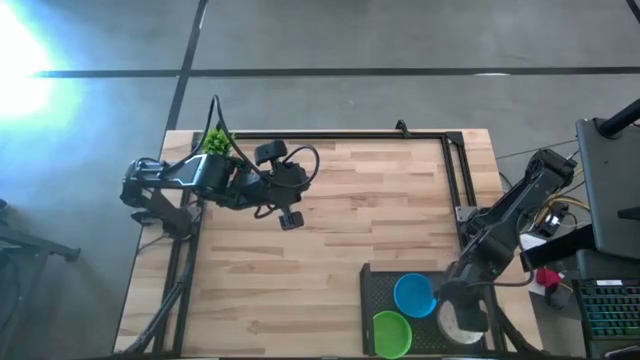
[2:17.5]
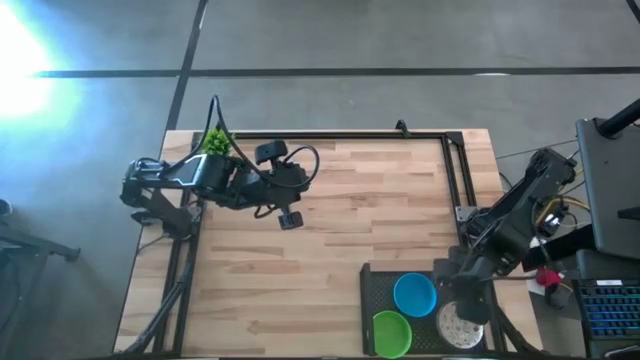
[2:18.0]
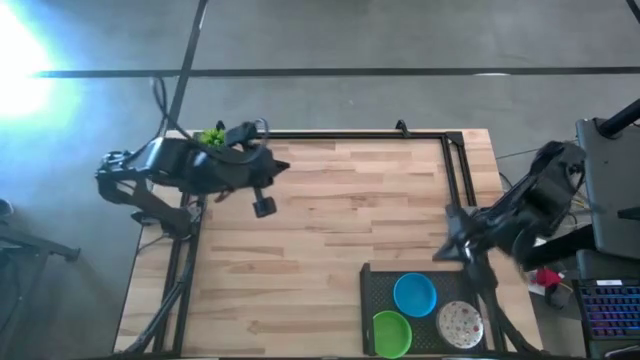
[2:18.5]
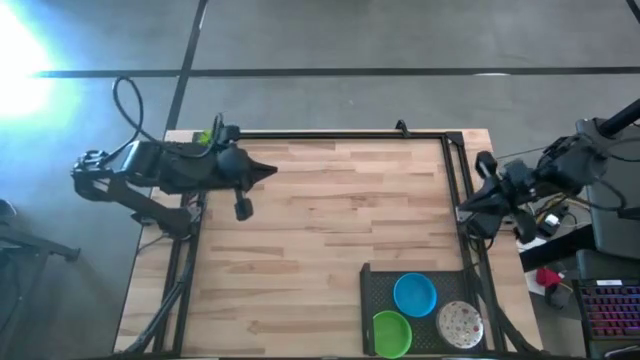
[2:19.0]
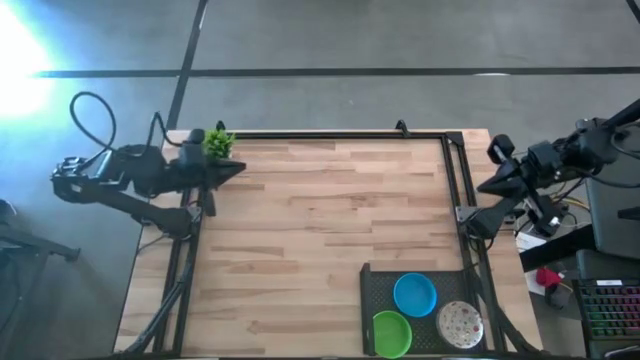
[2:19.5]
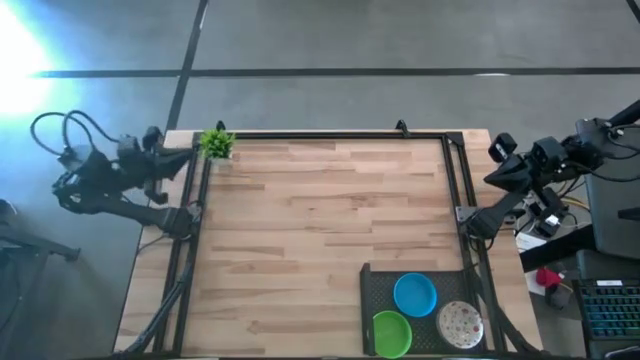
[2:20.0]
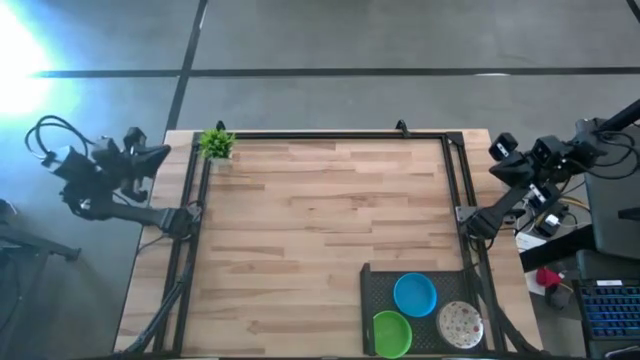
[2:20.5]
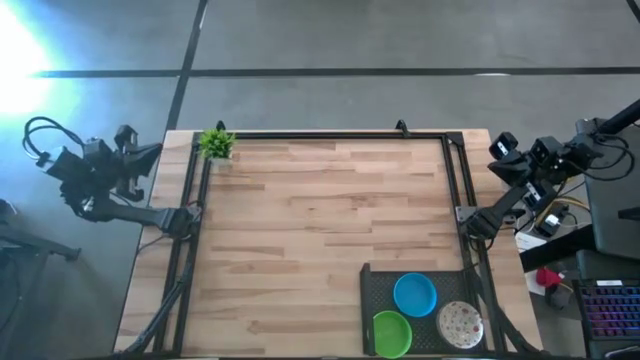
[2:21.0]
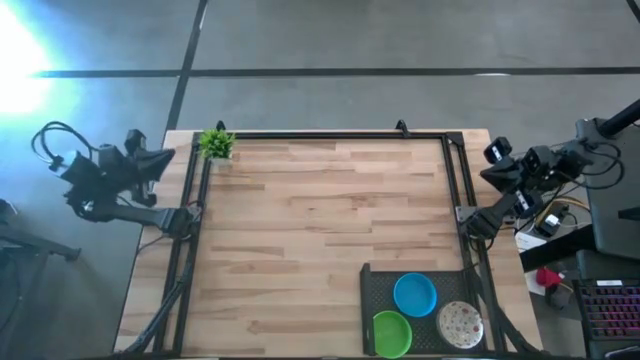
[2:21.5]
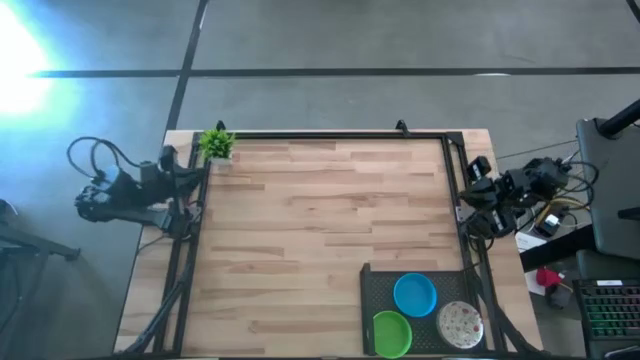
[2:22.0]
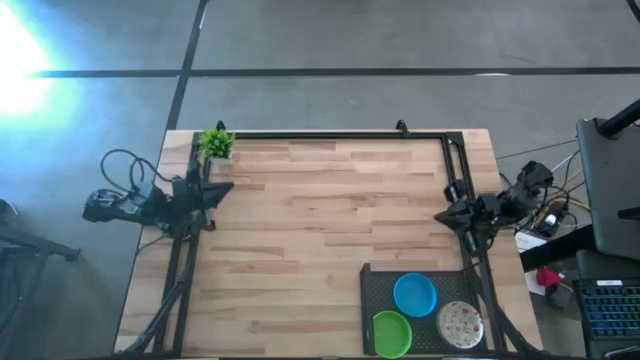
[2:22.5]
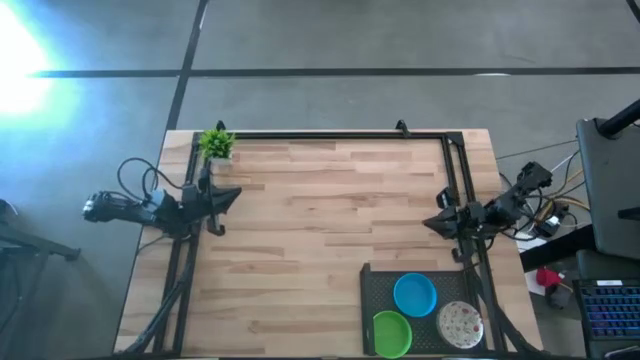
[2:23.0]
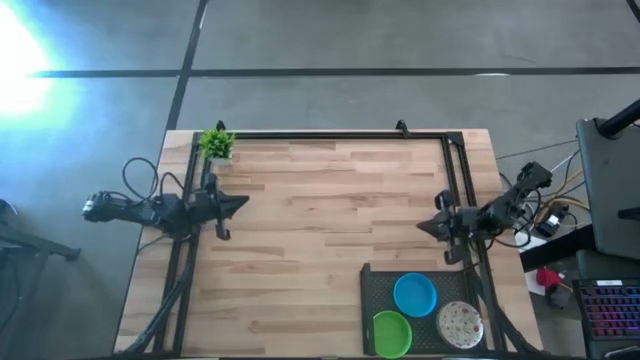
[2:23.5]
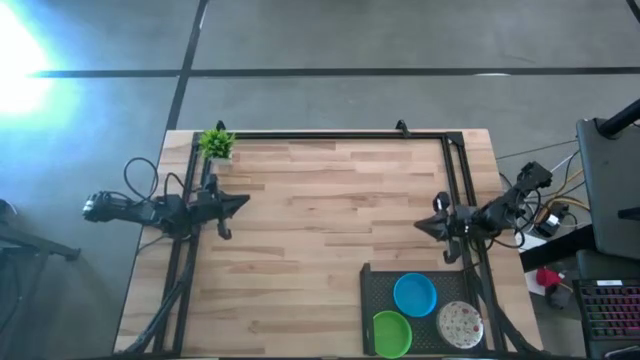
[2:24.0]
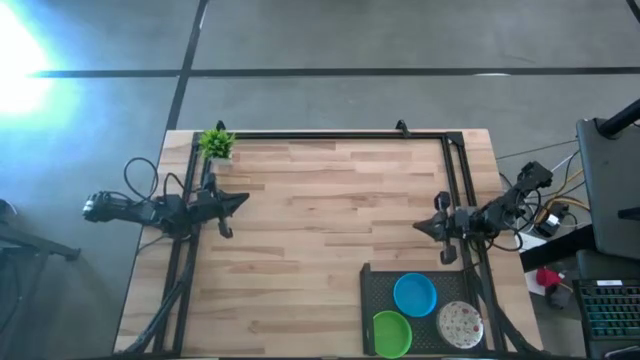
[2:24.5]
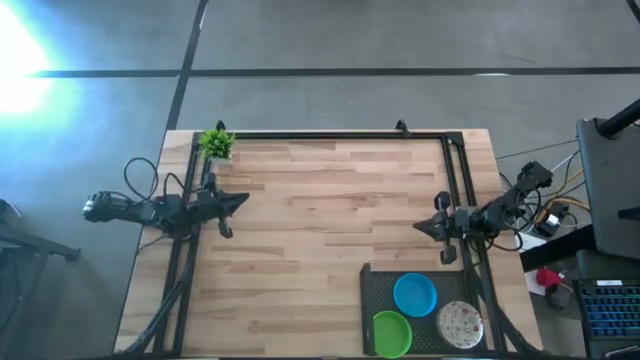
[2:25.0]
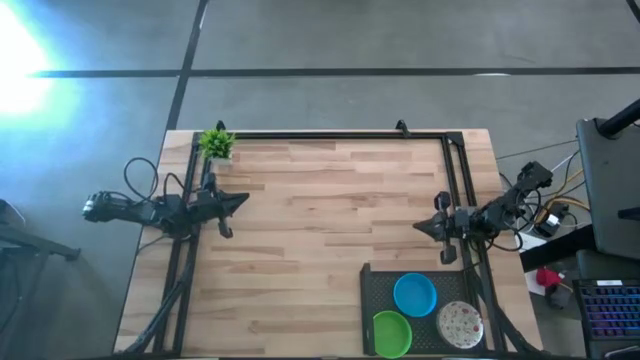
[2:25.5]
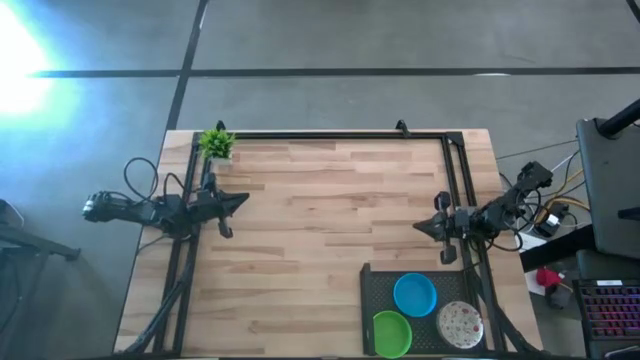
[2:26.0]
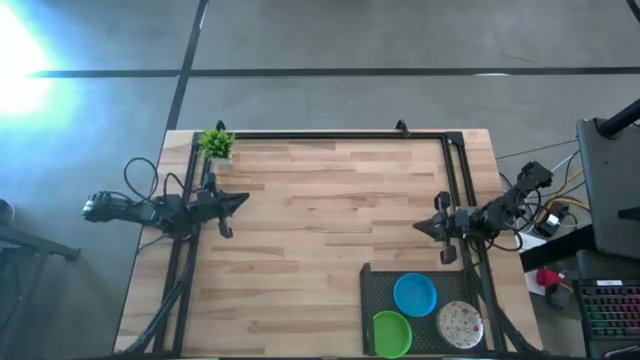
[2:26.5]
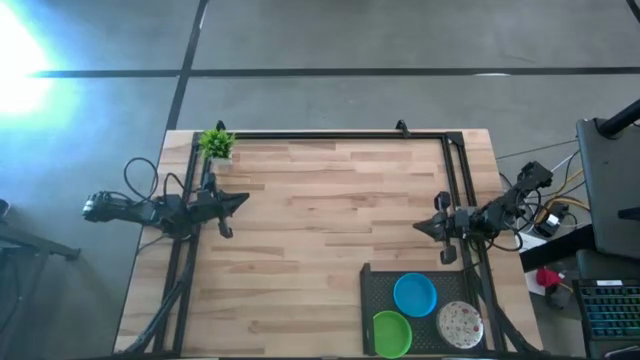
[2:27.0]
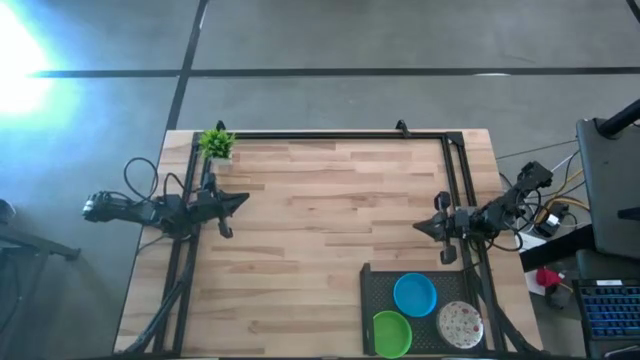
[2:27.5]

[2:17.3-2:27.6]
Task: Pick & Place Mini bowls
Return to Home Position
